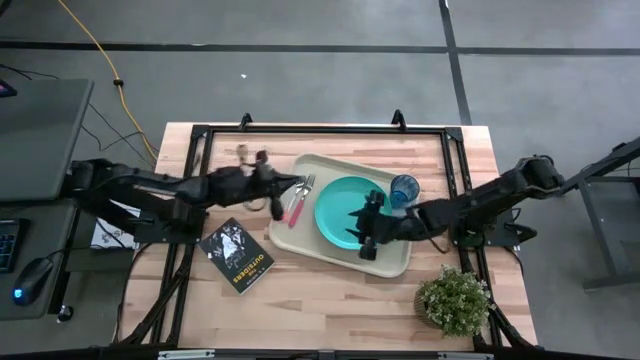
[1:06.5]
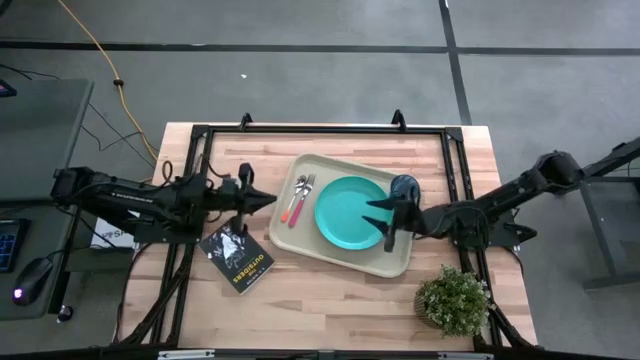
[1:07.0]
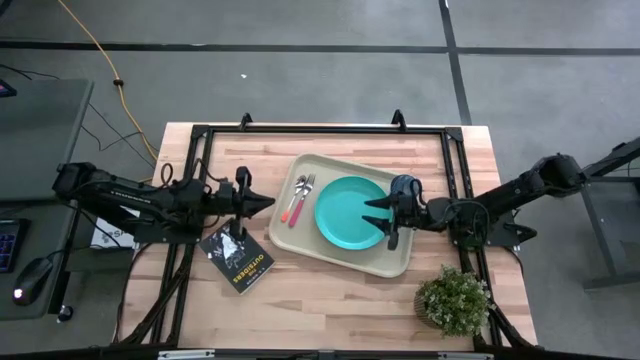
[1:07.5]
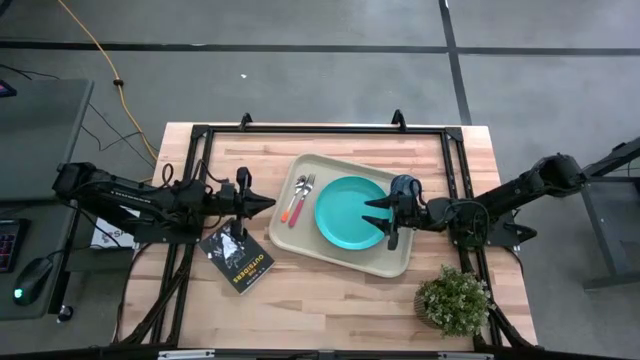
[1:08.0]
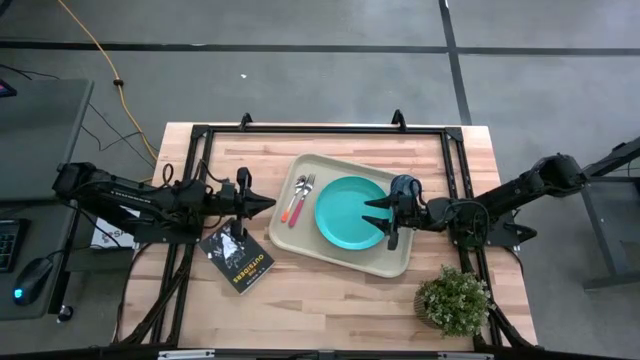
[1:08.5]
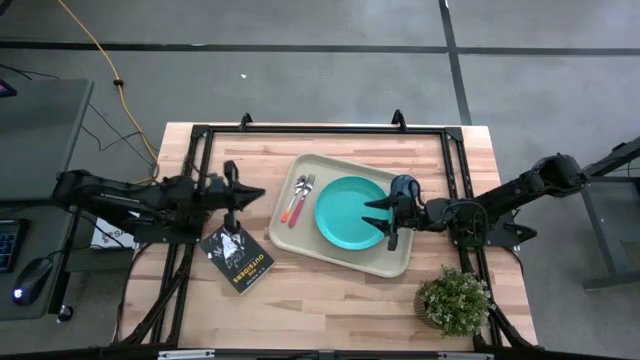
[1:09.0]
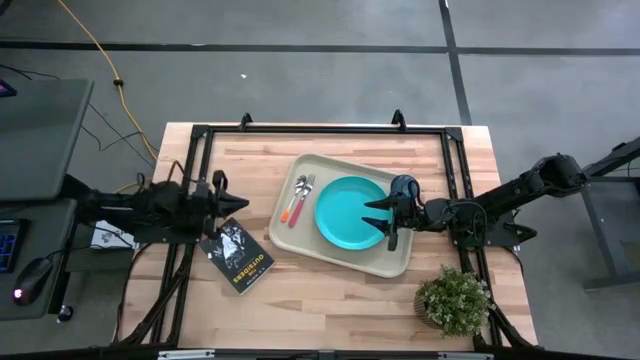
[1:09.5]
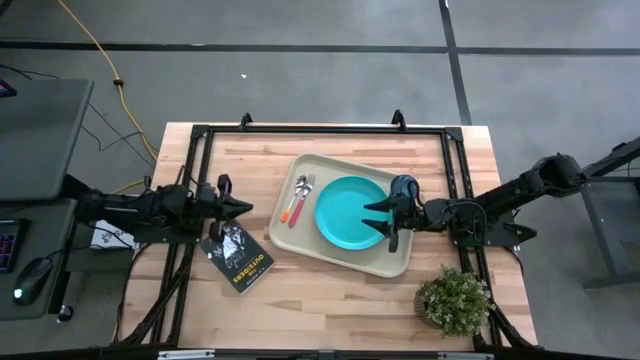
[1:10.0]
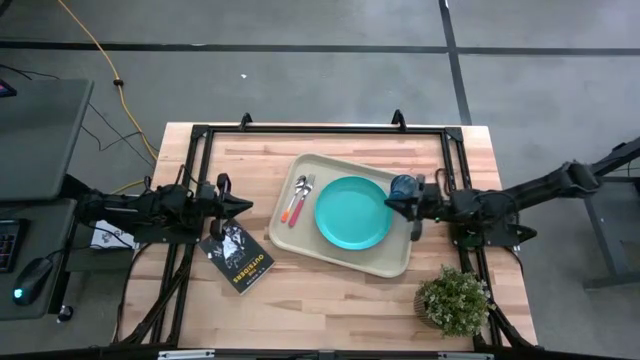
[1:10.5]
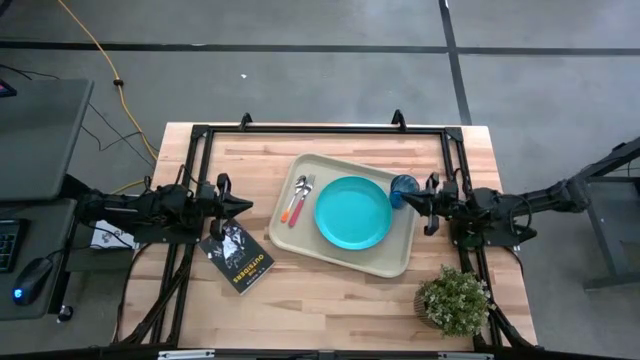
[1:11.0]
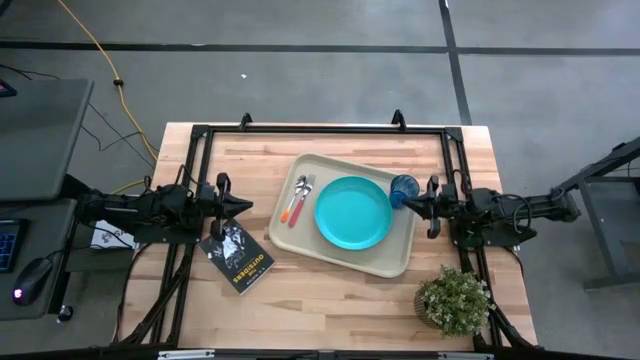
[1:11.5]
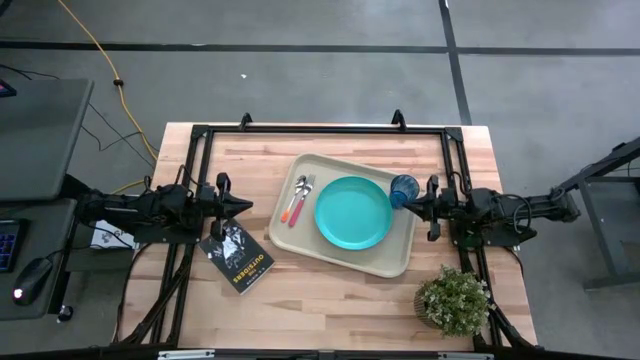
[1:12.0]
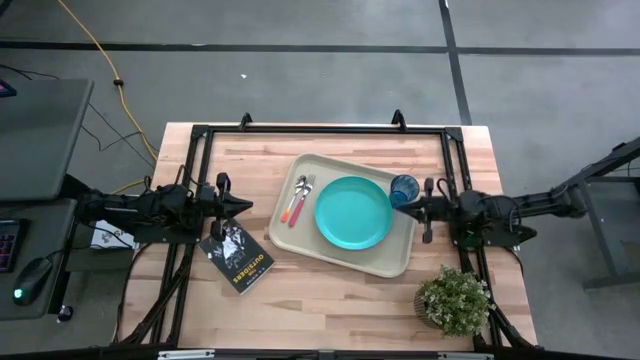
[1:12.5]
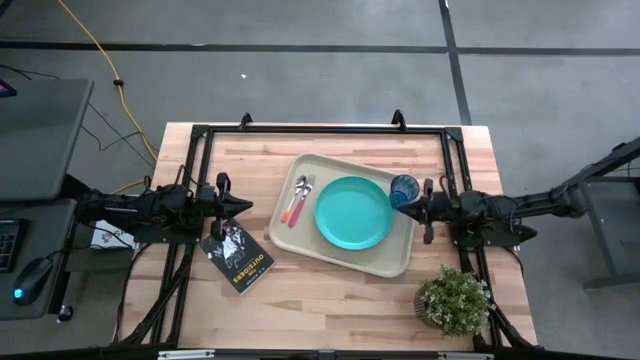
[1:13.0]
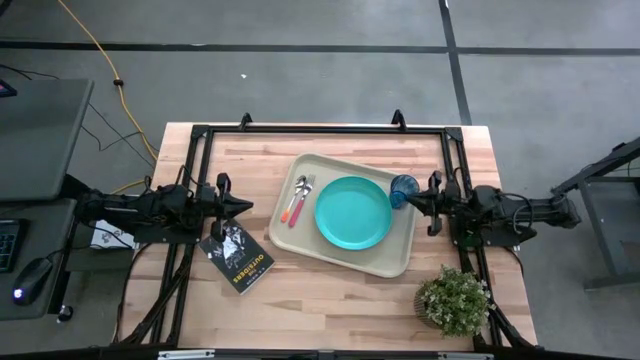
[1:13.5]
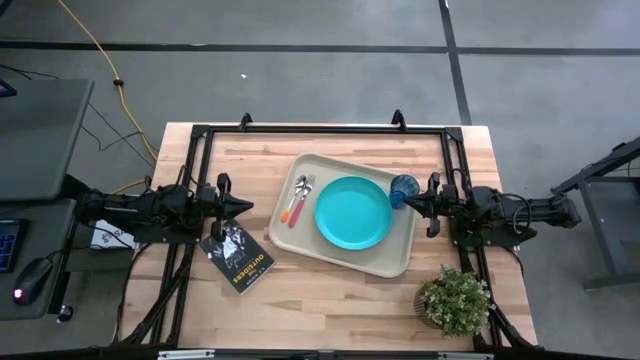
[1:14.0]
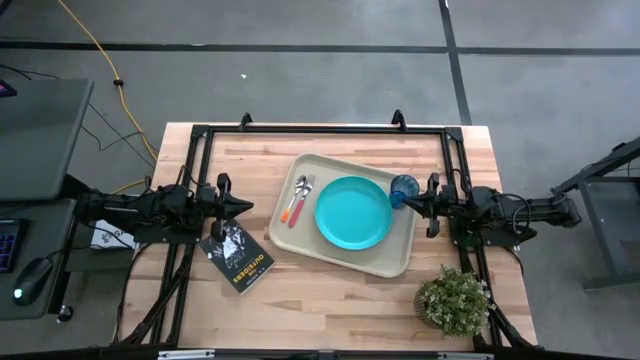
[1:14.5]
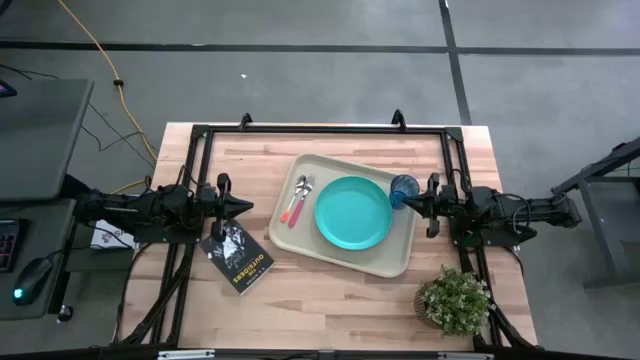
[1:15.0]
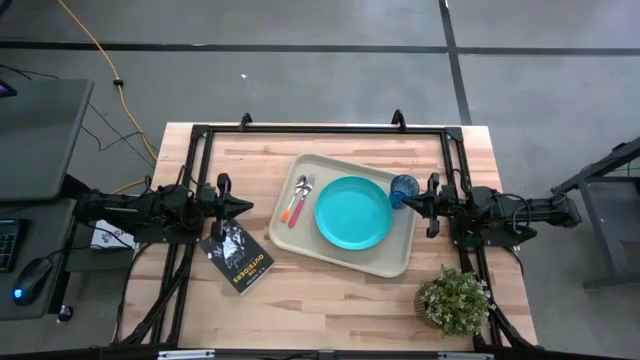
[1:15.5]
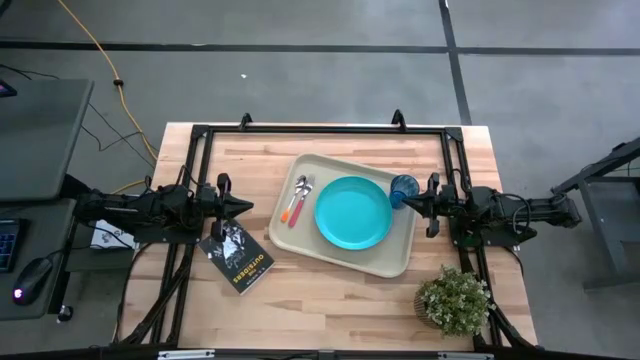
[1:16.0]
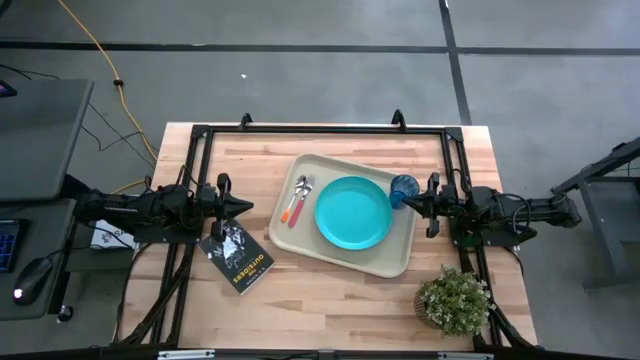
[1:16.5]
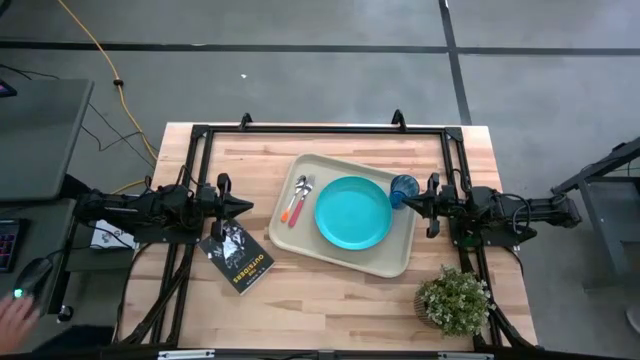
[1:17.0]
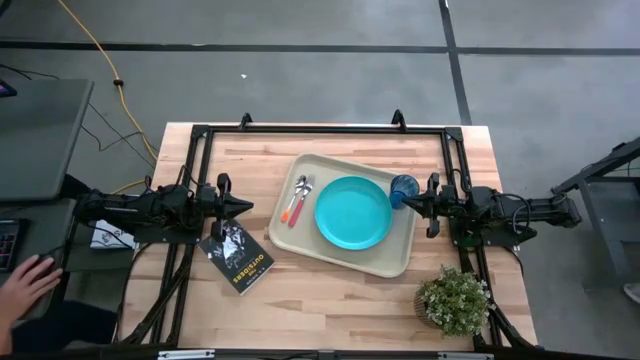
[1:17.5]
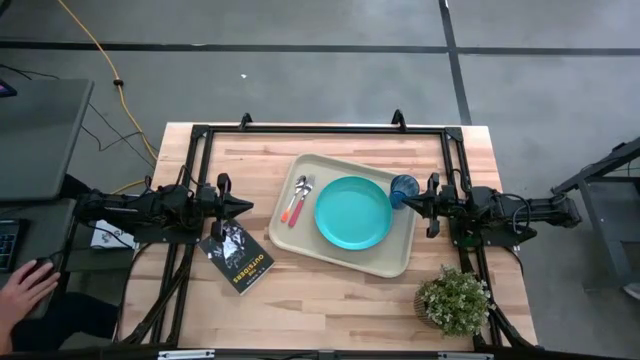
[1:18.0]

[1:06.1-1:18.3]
Task: Pick and place plate/cup/fork/spoon on tray
Return to Home Position

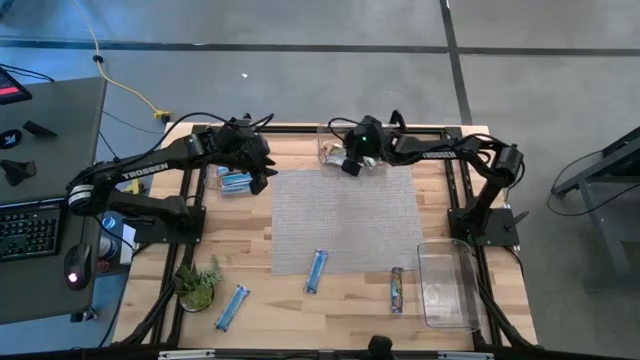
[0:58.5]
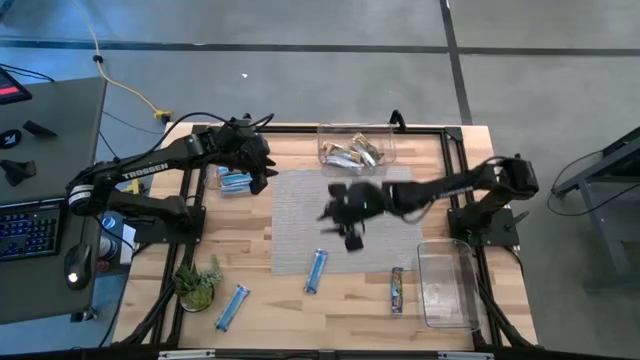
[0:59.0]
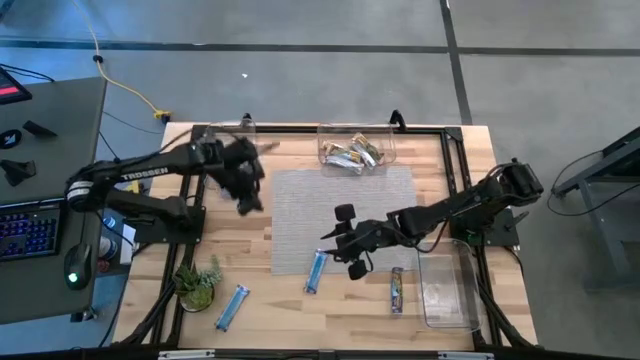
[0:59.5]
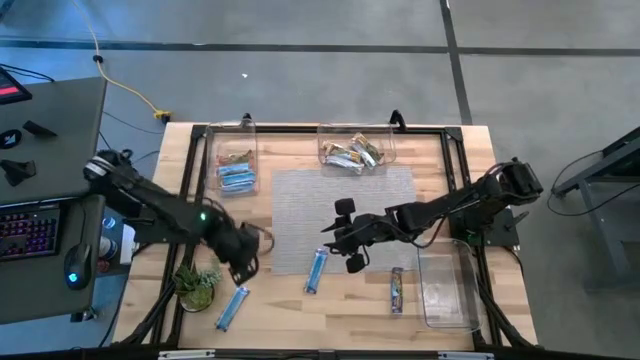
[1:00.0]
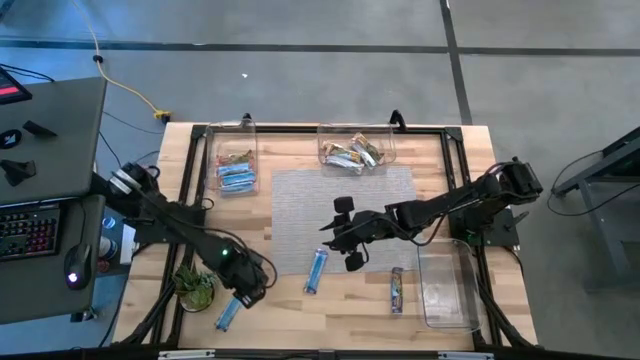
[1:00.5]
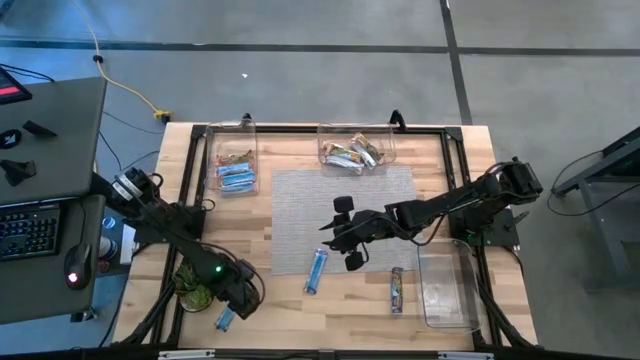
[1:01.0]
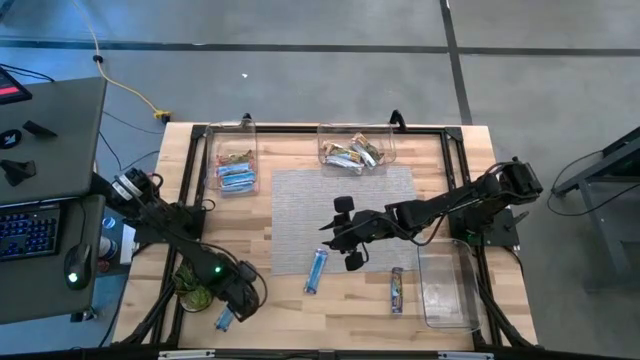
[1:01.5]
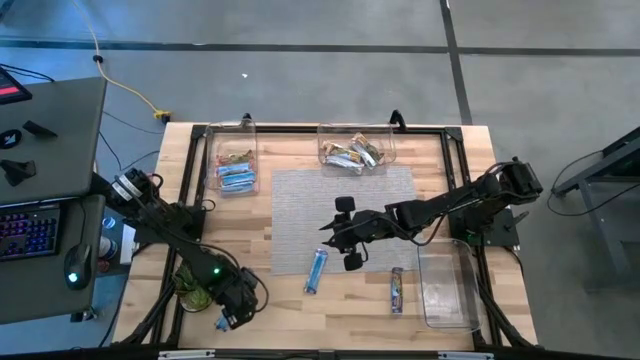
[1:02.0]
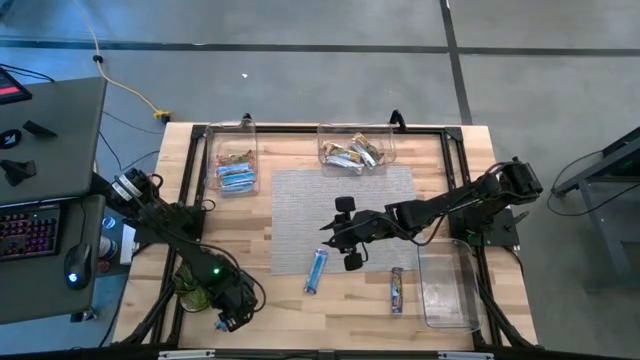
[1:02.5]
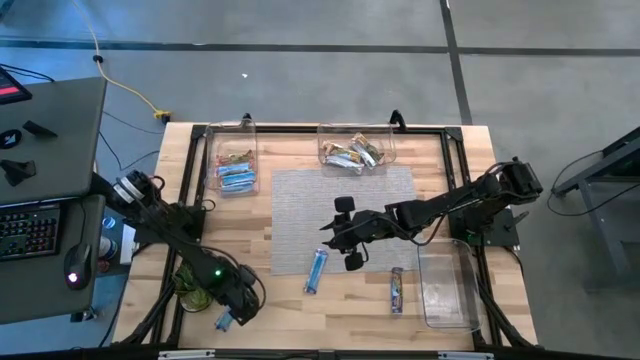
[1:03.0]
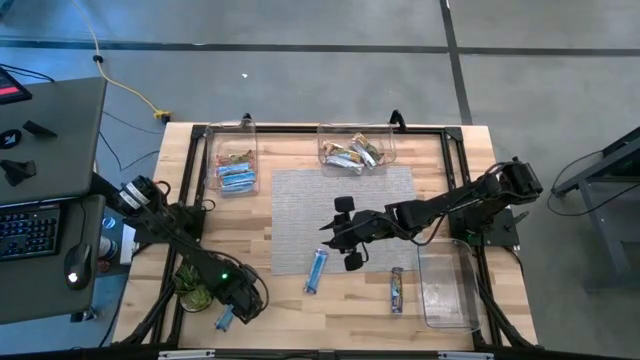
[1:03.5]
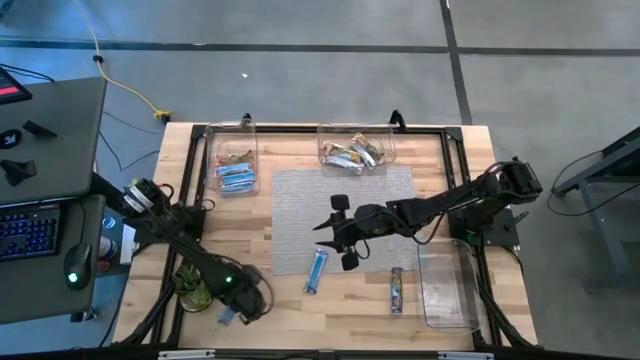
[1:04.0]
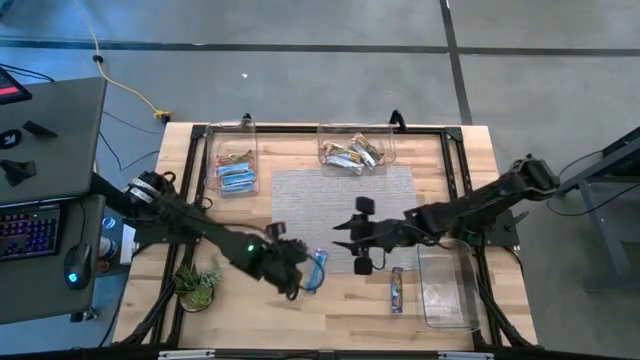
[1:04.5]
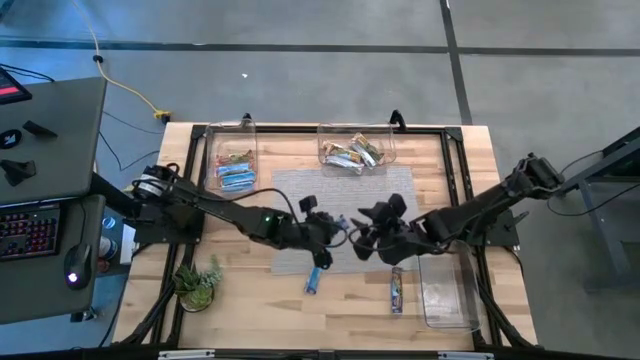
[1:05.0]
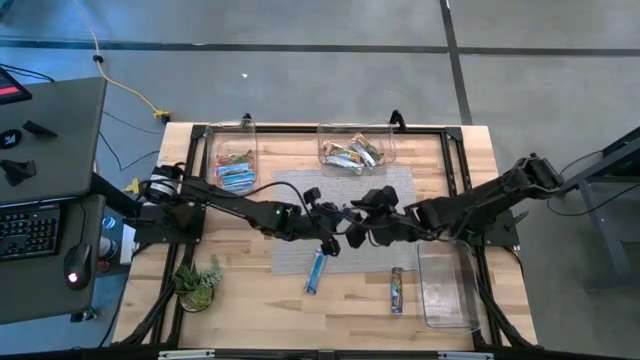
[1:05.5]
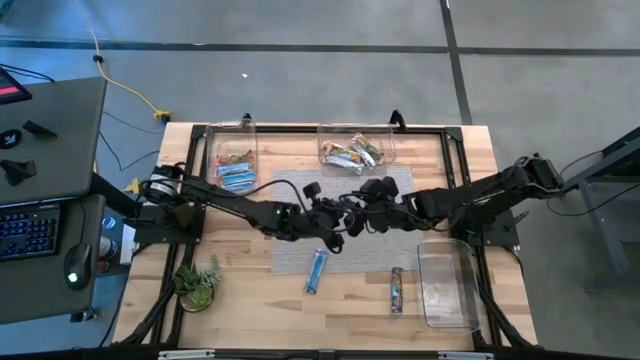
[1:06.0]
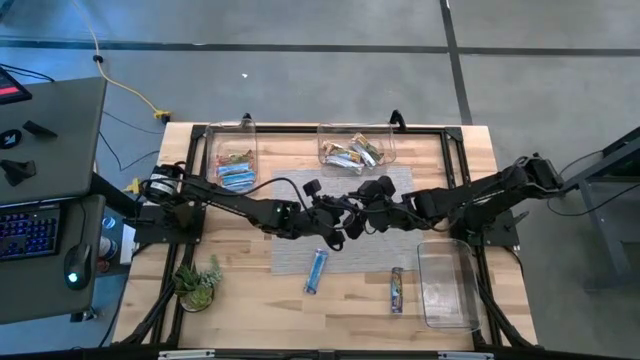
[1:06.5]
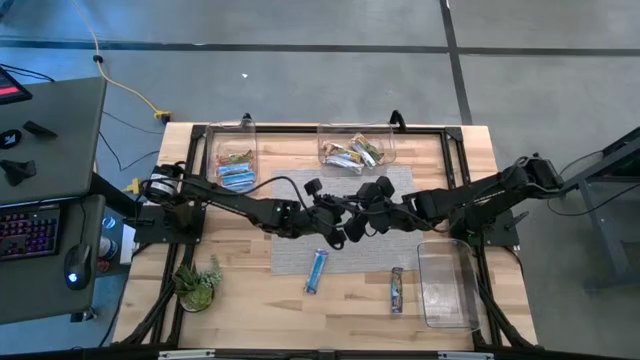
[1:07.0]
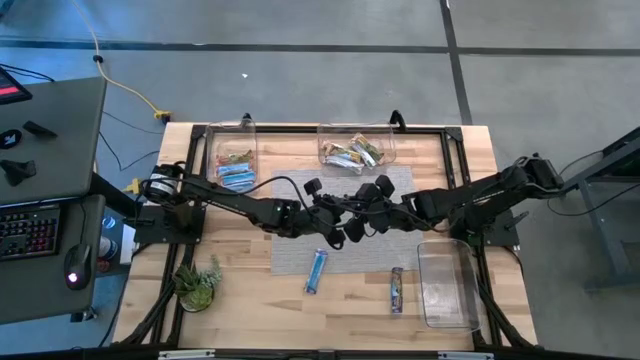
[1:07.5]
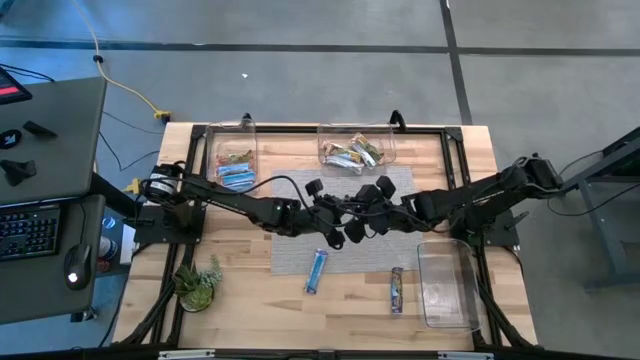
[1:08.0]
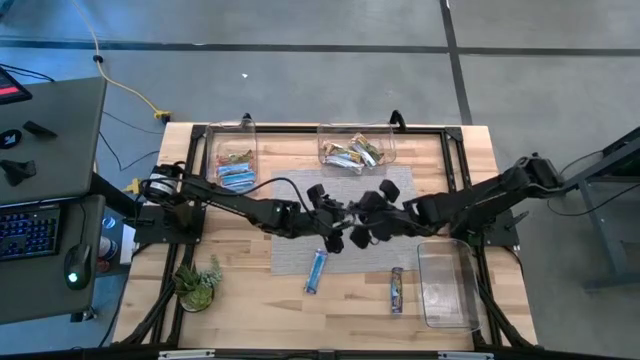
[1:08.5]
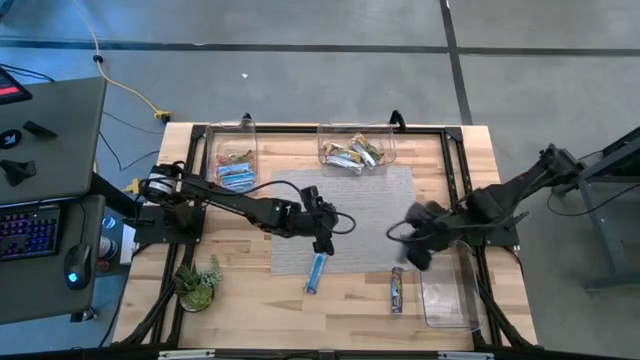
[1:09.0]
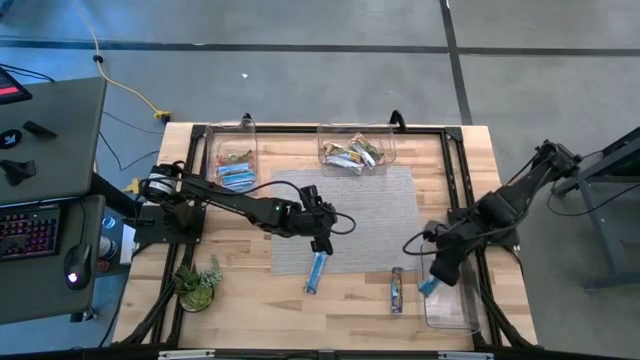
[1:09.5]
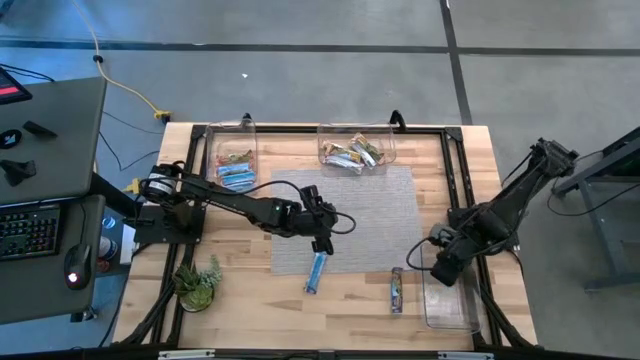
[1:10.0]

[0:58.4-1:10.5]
Task: Pick and place Granola Bars by type
Put the blue granola bar into the bottom transparent bin
